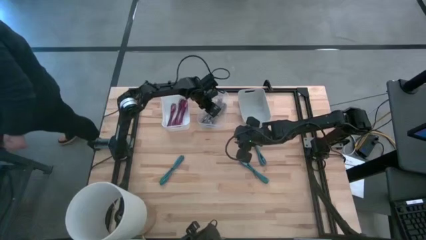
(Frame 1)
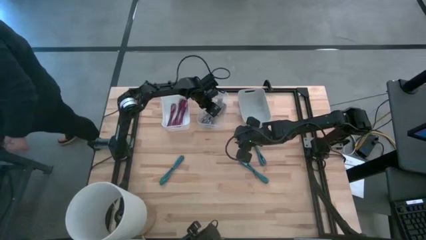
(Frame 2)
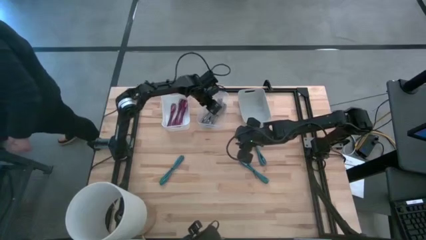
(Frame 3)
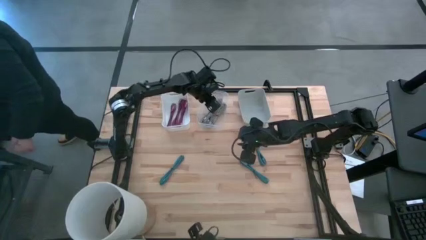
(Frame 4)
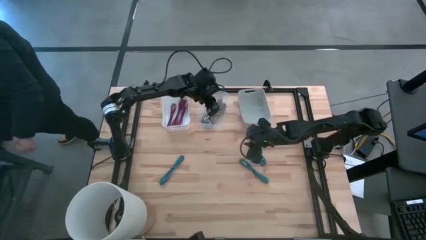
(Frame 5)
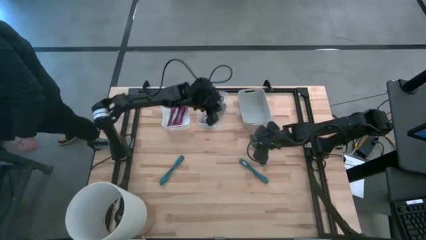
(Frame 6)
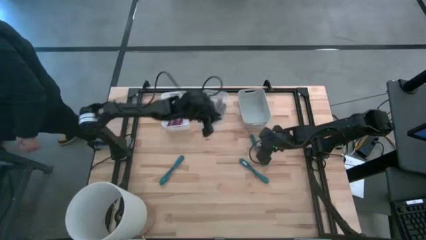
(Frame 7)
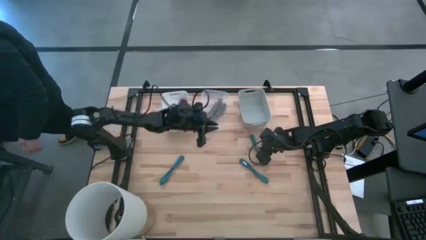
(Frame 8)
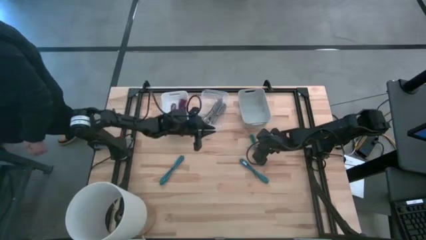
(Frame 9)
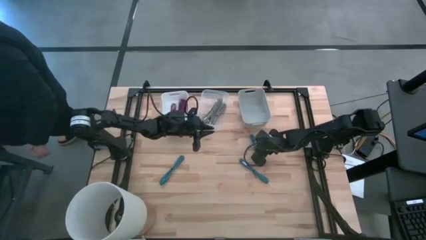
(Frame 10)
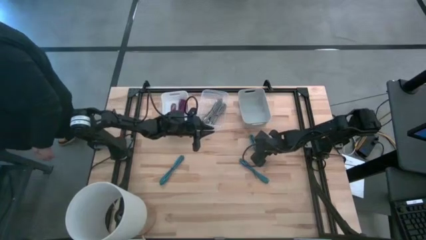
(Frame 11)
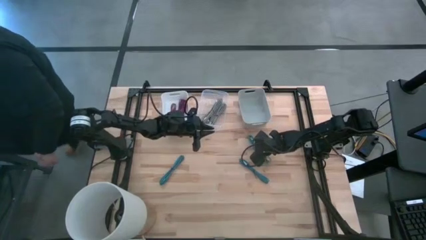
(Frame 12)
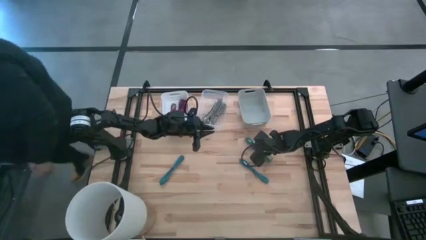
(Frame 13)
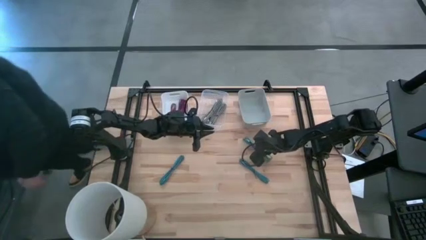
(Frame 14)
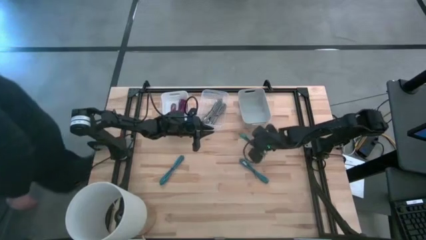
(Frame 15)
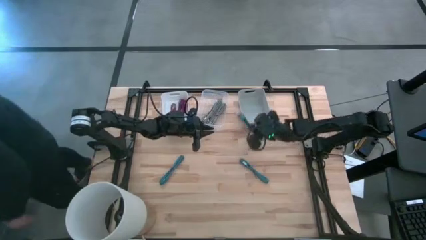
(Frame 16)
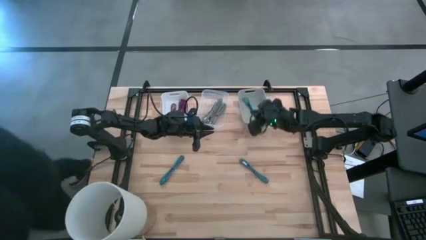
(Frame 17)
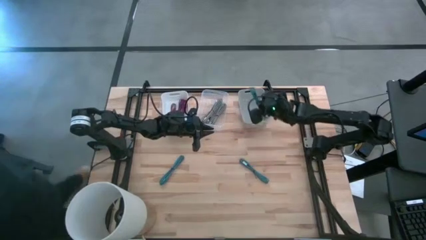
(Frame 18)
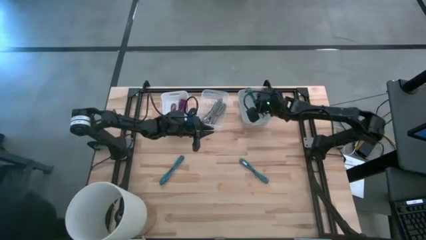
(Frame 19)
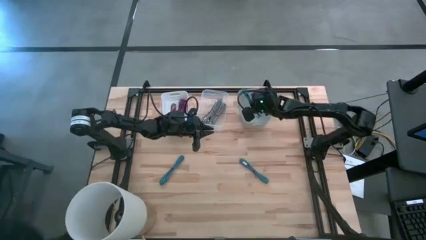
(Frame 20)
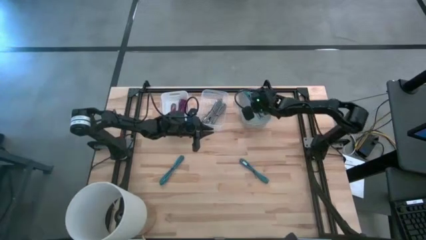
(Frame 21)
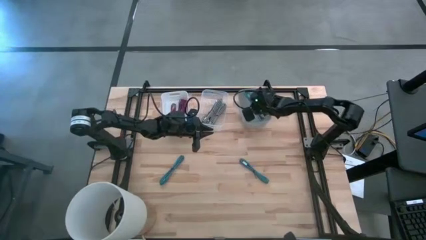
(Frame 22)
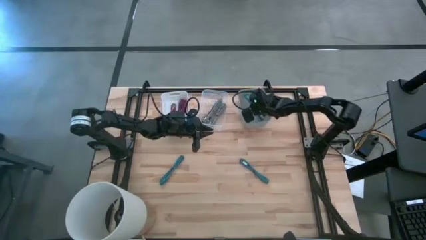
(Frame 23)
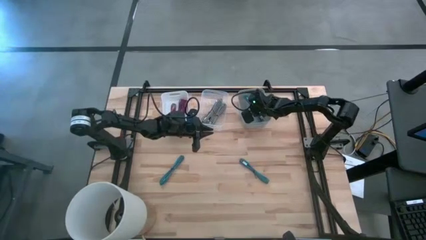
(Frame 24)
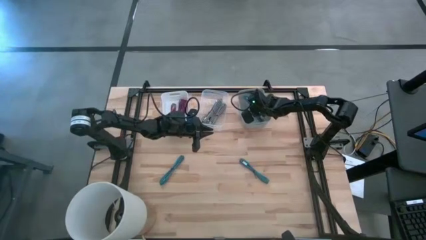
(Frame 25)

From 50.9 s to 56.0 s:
Task: Pick & Place USB Port
Put the top right blue charger cable into the gray bin

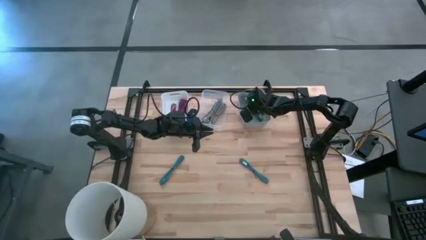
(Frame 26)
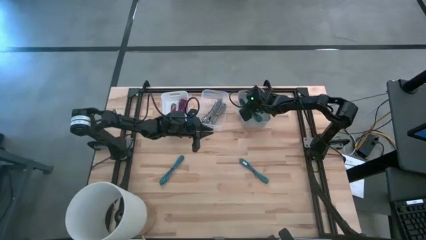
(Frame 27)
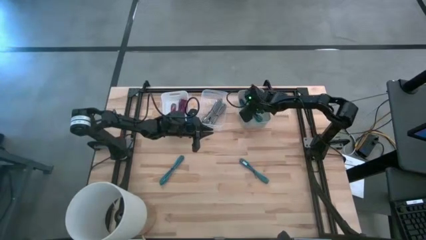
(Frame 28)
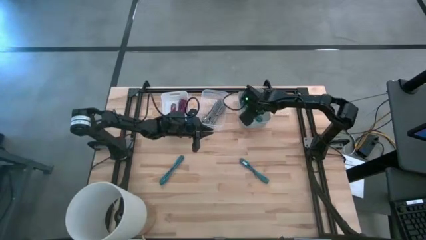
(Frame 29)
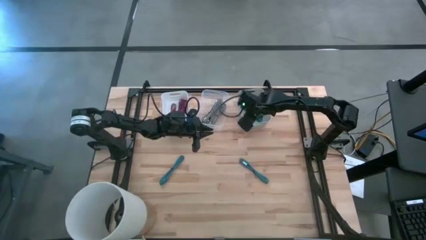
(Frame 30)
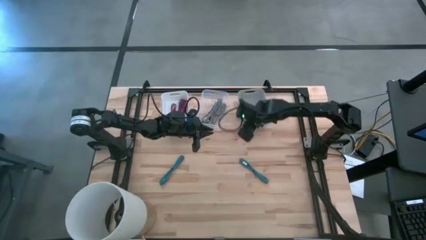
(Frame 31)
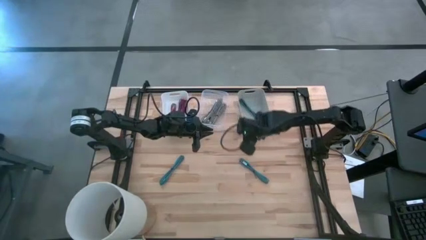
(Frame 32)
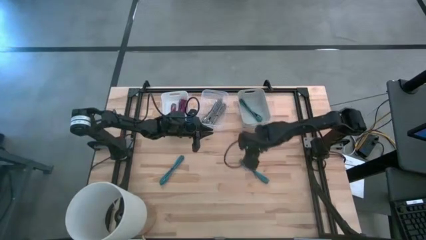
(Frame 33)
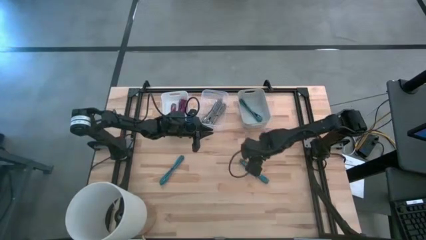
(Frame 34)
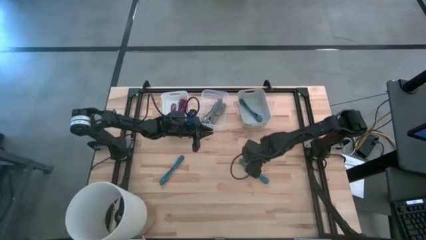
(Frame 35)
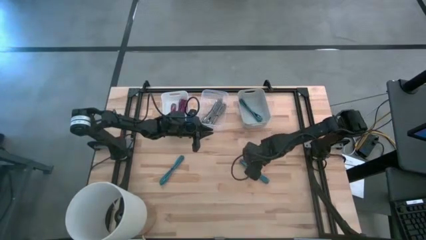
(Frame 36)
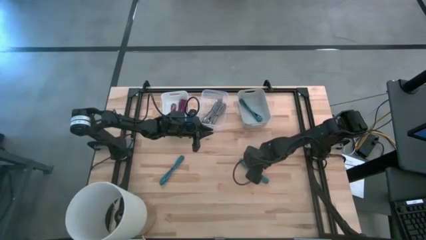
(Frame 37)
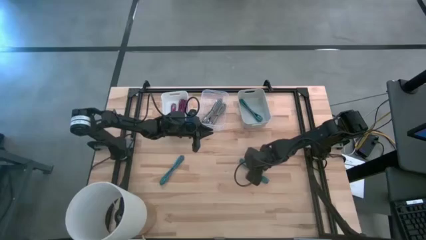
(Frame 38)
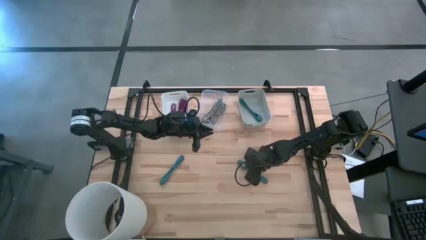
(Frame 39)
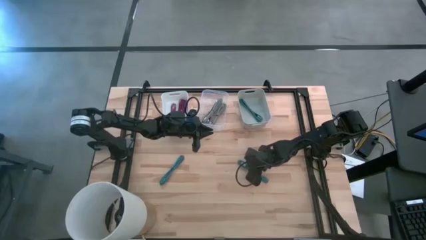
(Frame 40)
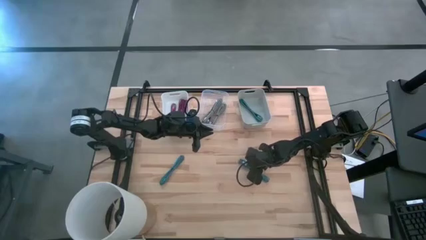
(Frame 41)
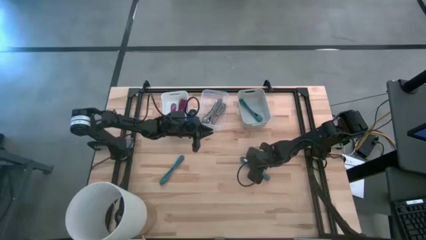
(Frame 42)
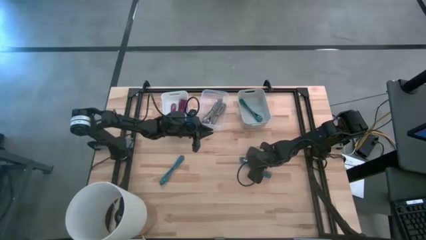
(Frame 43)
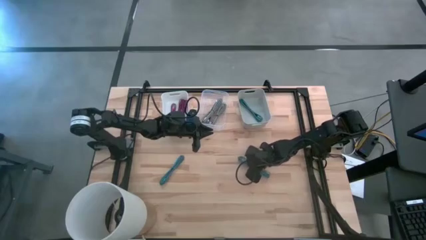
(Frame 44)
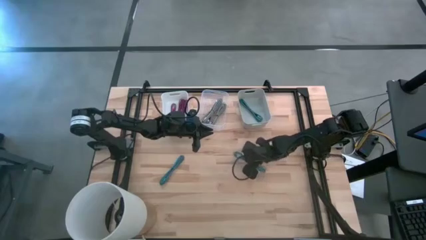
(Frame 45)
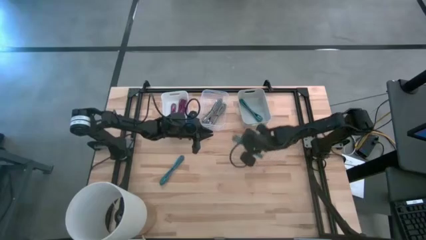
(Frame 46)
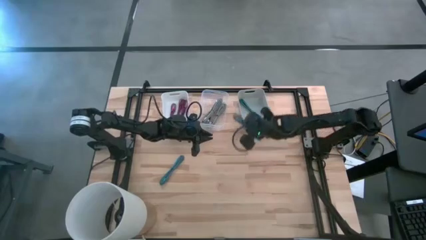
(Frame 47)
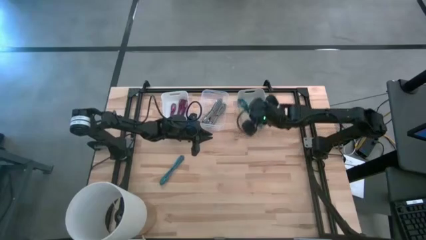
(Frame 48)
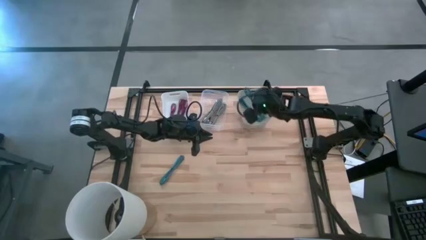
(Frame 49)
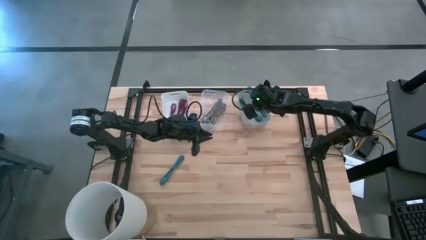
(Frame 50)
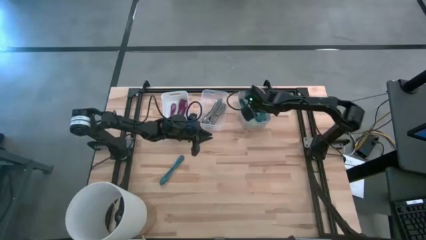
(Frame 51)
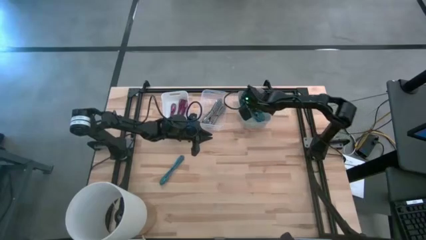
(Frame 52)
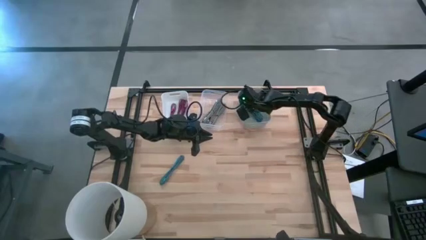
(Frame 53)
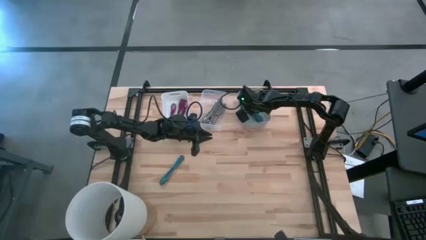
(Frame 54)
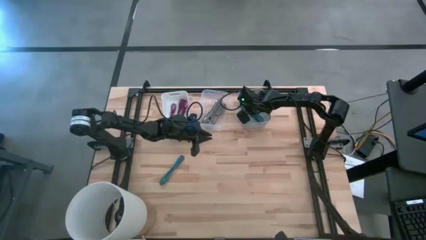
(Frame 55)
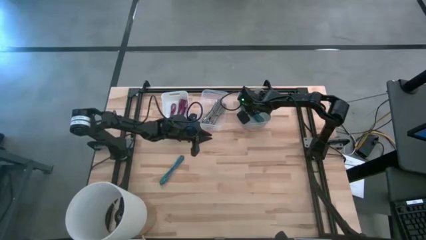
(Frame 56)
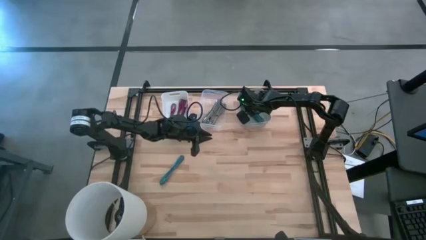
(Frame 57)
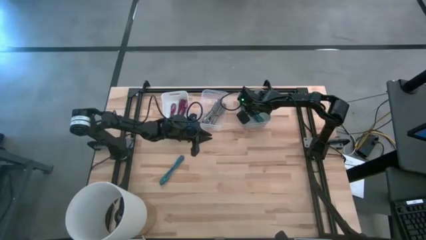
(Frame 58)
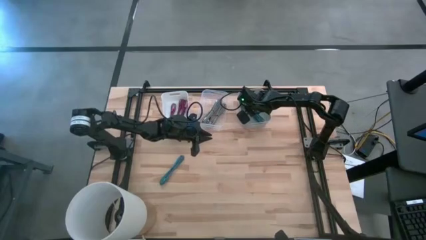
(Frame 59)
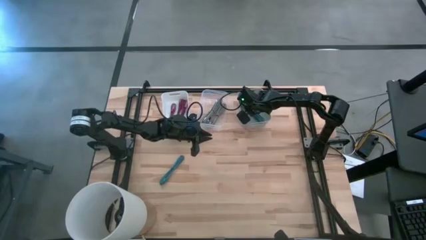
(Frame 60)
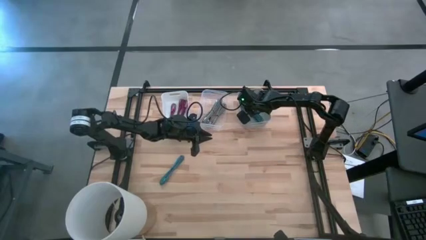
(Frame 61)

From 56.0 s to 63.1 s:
Put the right blue charger cable into the gray bin

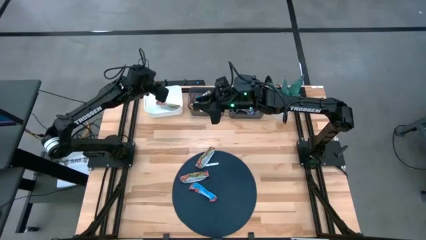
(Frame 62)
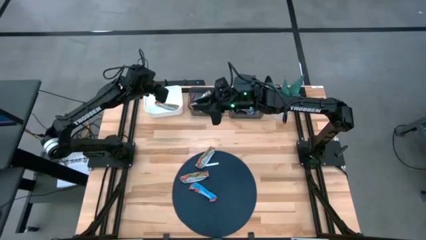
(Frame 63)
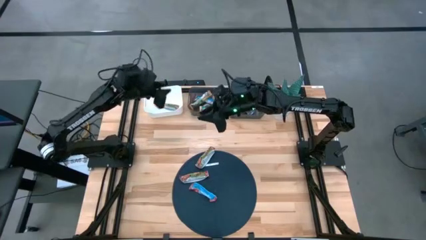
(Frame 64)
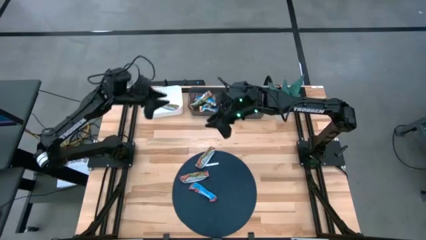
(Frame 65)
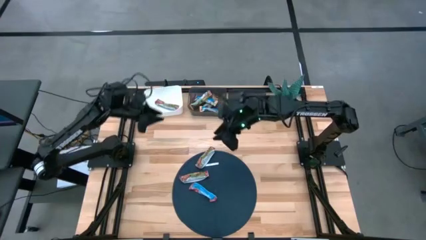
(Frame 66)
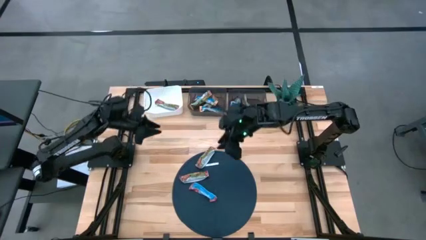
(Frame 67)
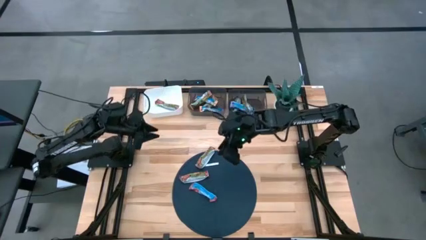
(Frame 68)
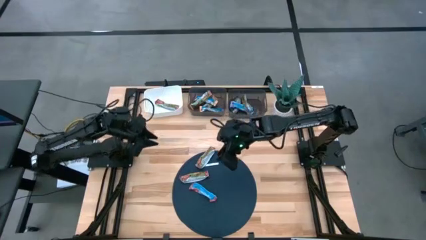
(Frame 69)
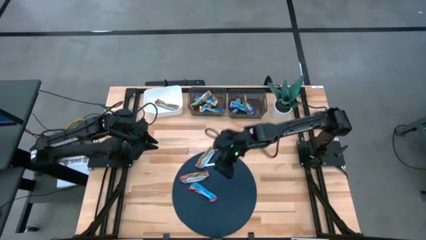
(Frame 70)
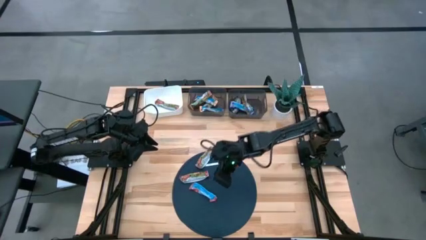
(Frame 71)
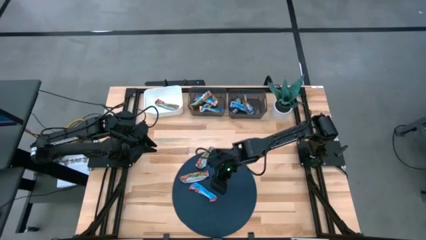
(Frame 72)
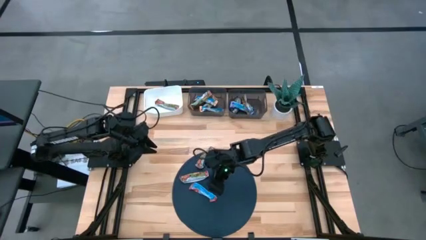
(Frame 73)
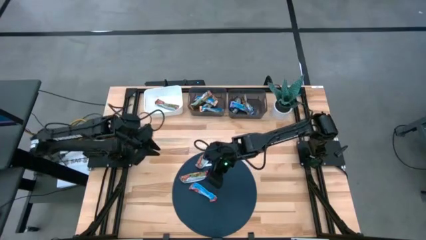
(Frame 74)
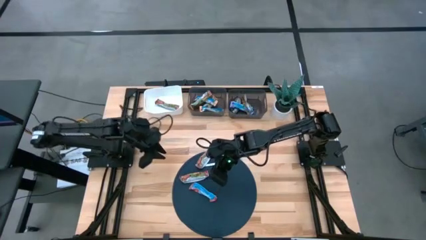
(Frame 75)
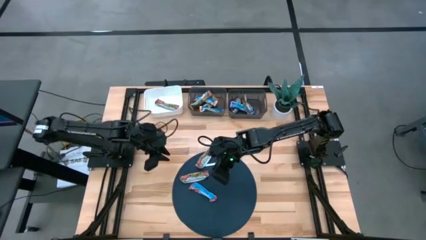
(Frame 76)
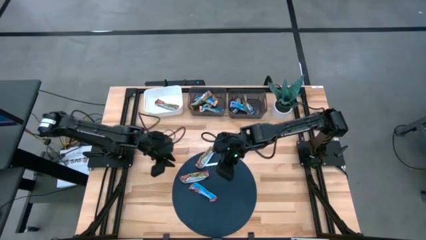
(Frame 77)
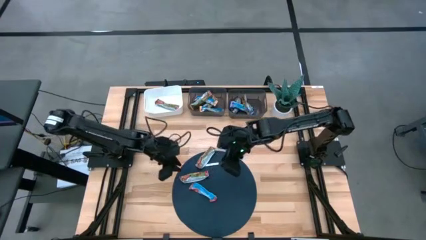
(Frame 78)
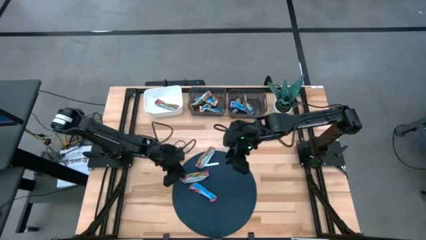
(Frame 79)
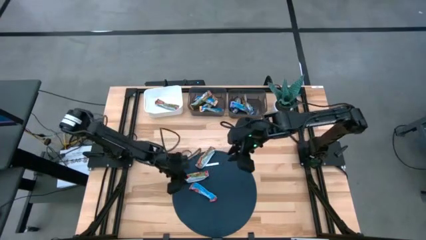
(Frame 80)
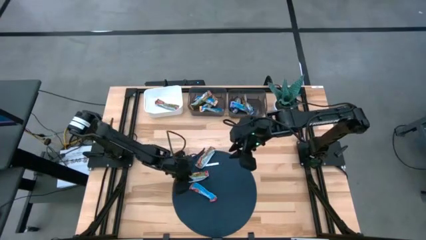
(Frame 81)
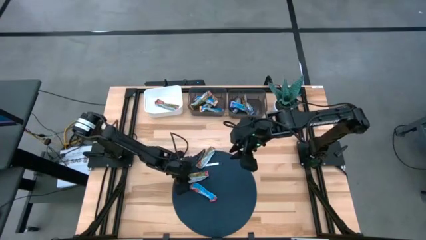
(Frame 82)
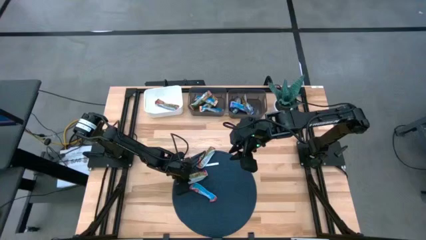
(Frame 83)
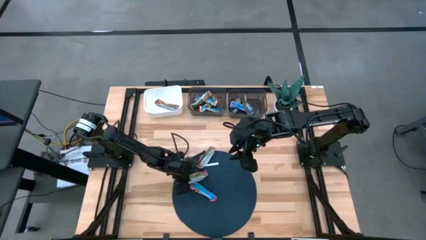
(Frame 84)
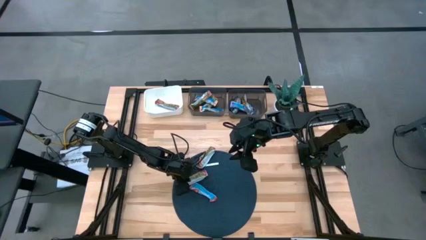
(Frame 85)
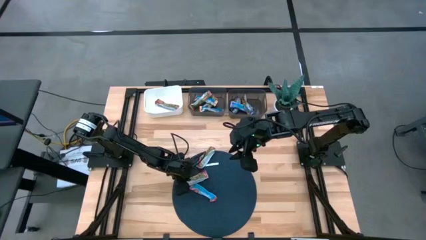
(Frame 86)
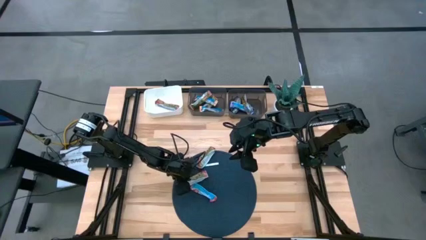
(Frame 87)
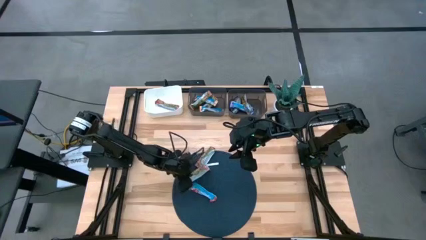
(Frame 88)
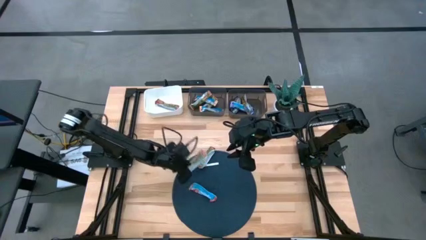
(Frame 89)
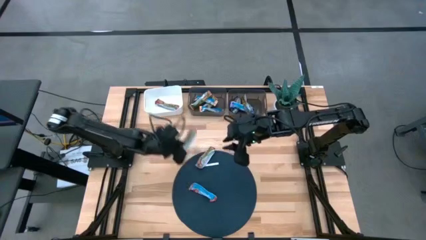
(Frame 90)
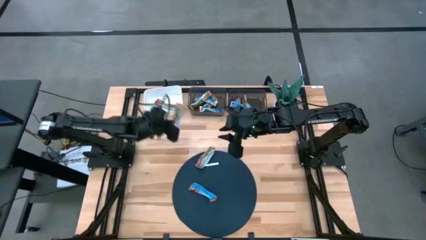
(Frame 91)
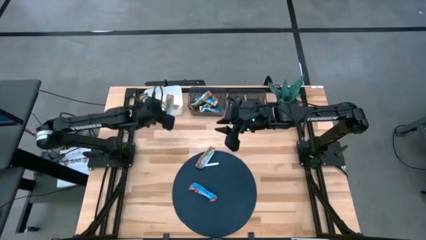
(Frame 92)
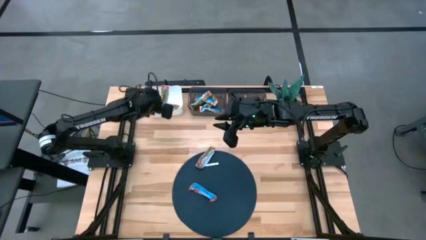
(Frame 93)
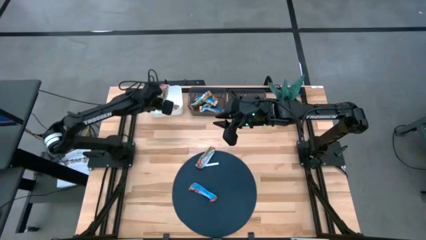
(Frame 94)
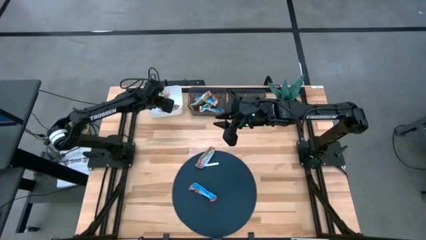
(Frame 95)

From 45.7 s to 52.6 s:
Task: Pick and place Granola Bars by type
Put the red granola bar into the white bin
